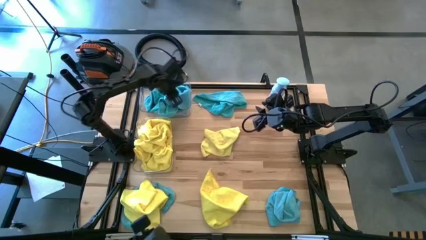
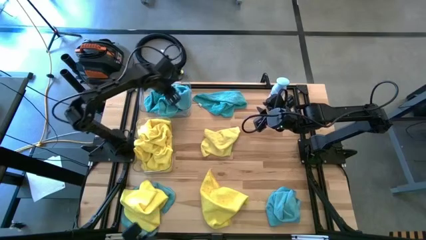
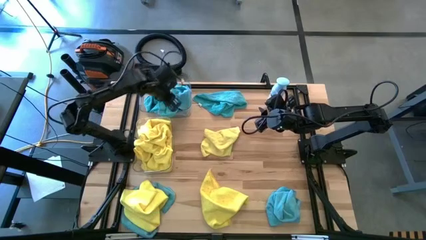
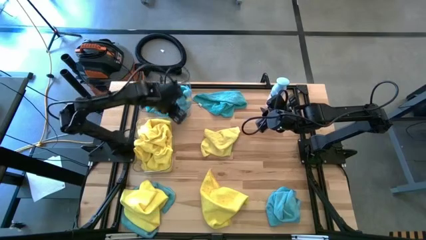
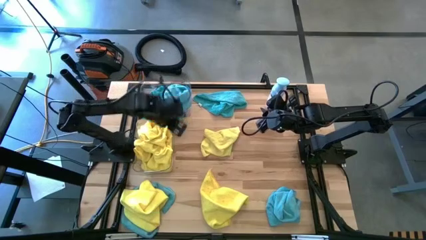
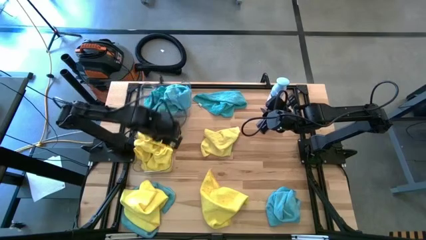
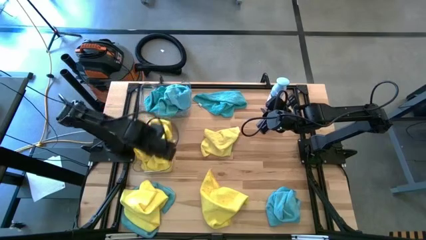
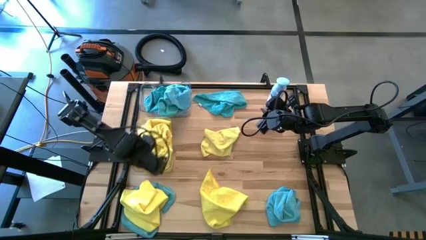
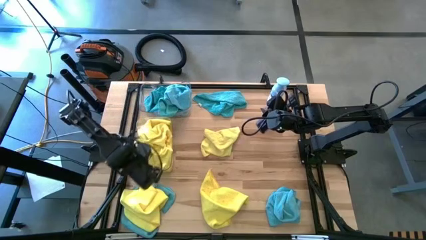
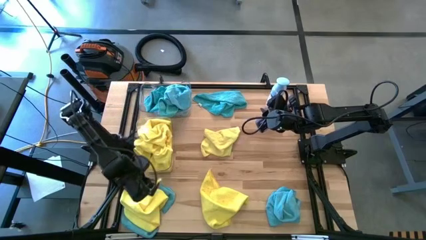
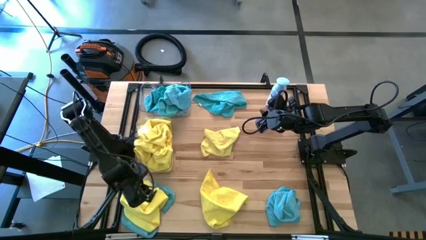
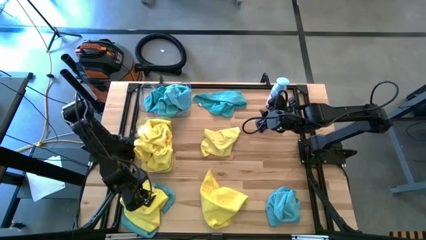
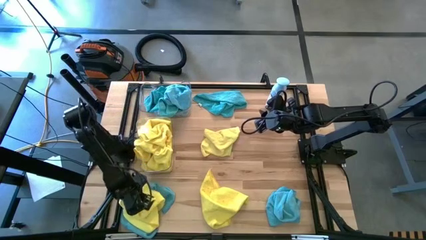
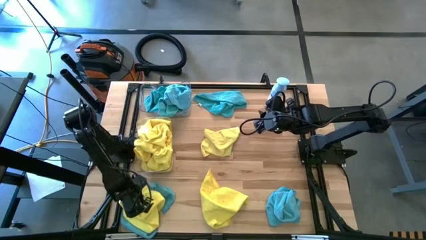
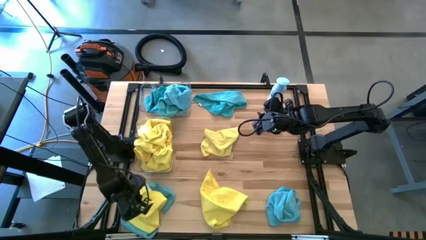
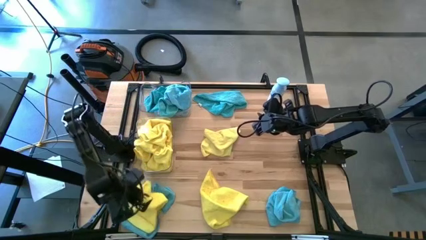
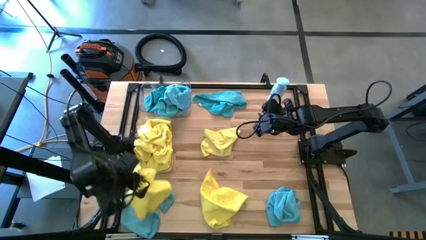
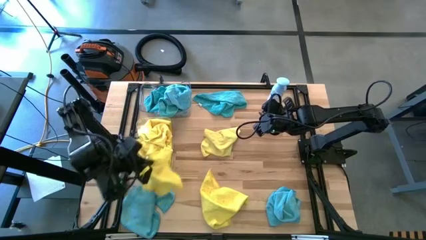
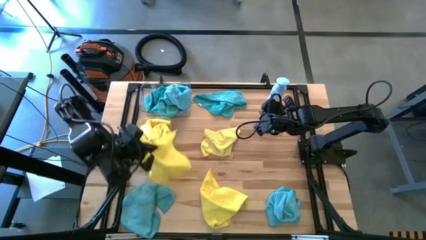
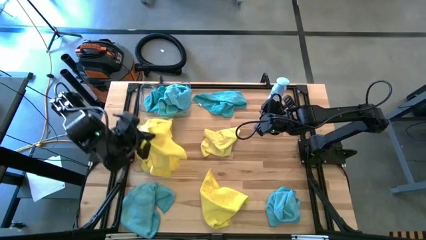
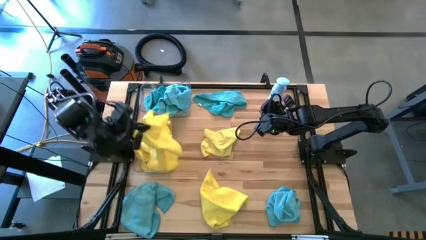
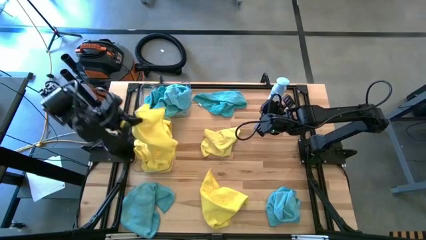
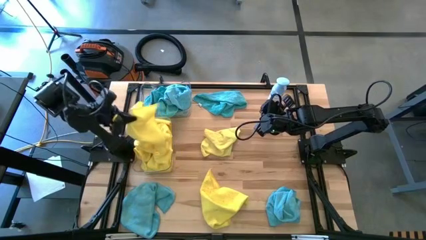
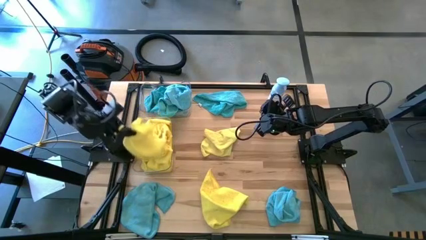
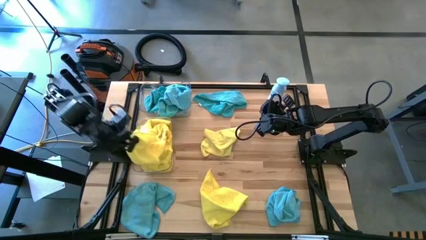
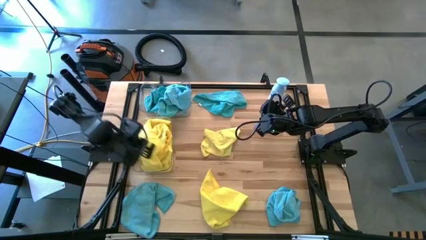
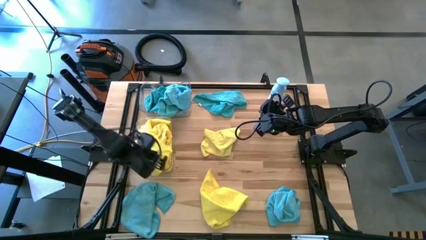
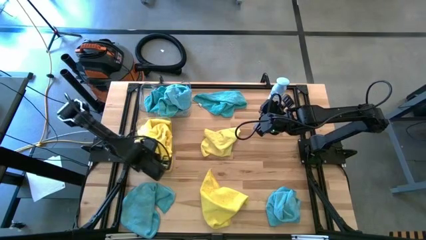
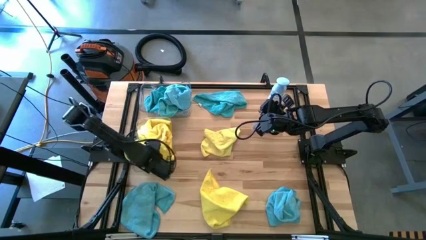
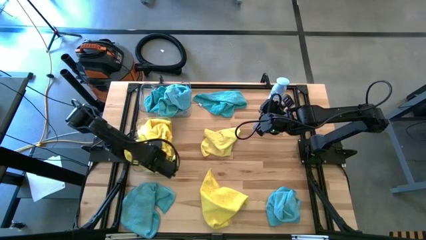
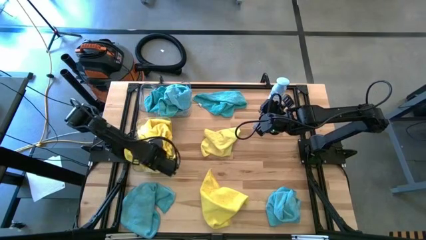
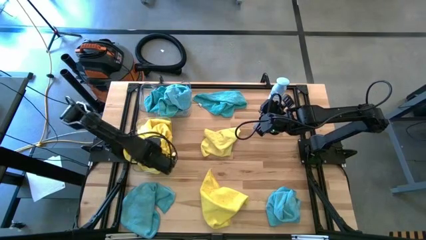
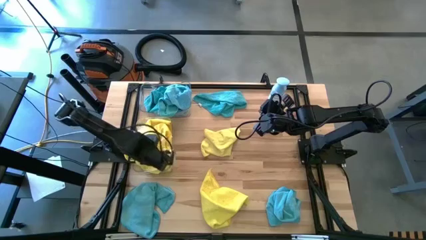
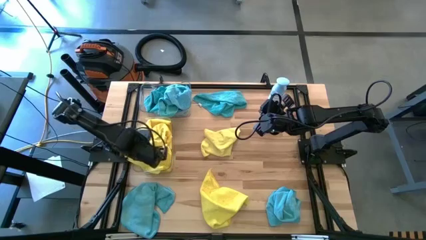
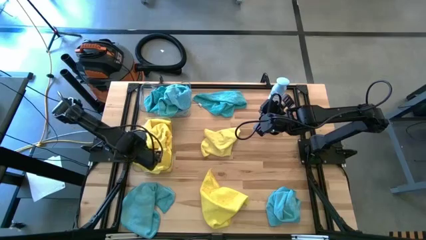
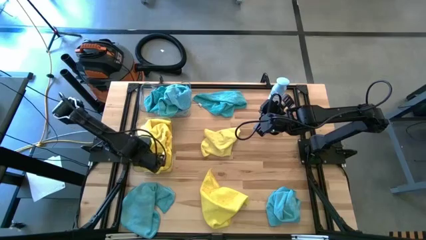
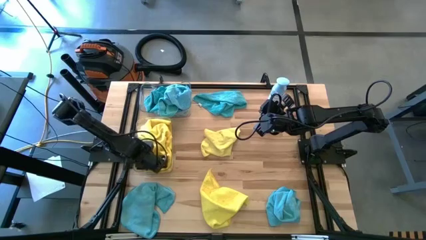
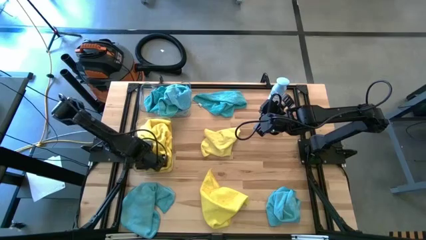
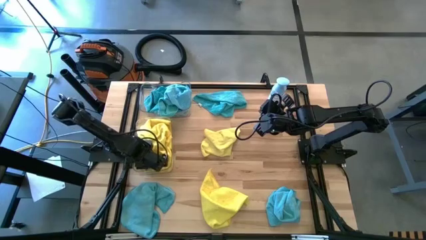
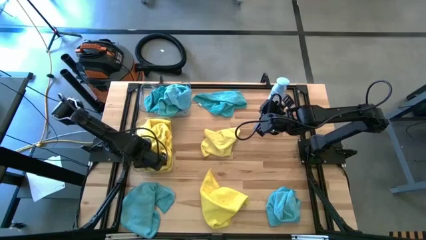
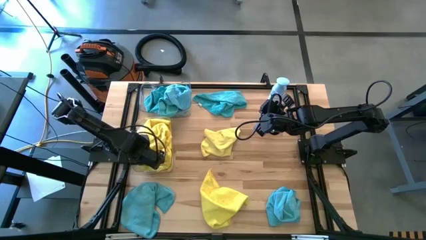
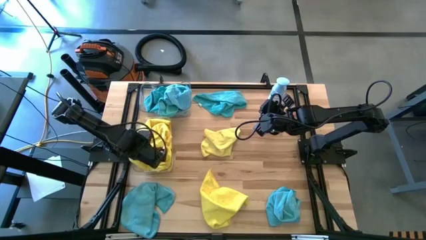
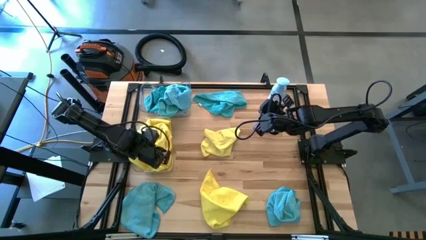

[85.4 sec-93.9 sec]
Task: Sort microfiber towel by color & place in baskets
Put the yellow towel into the bottom transparent bin

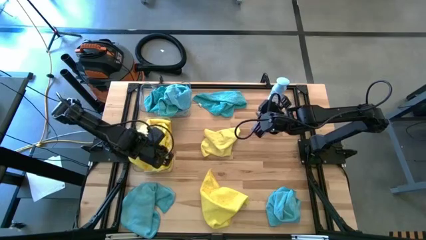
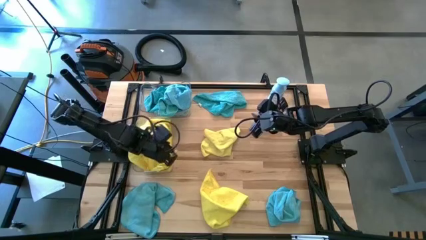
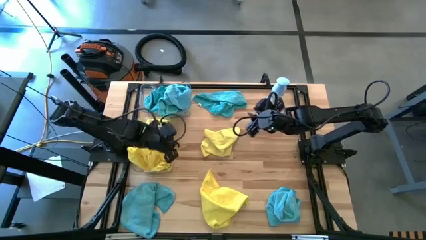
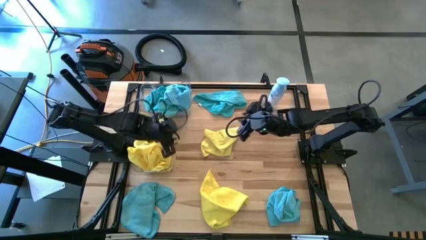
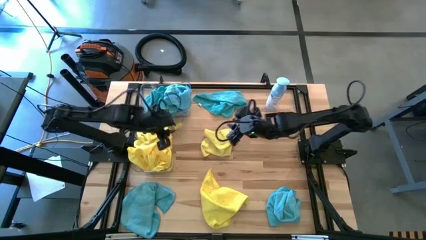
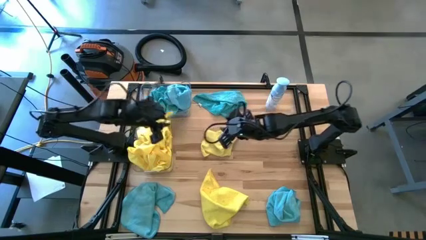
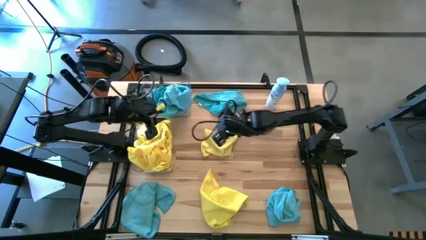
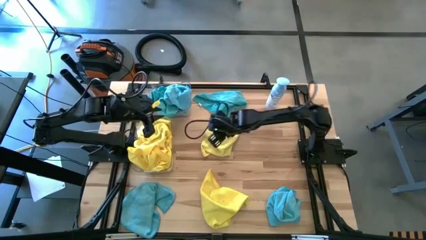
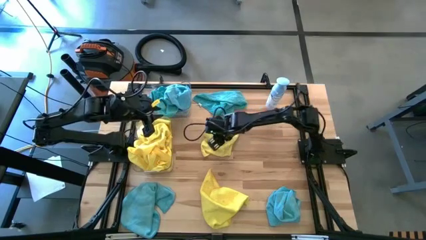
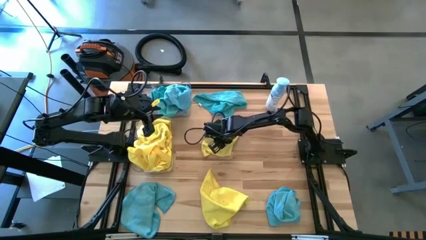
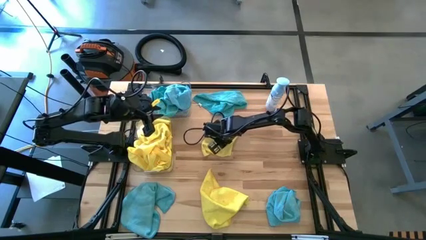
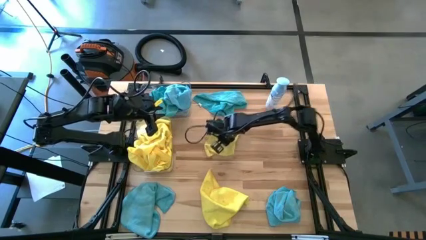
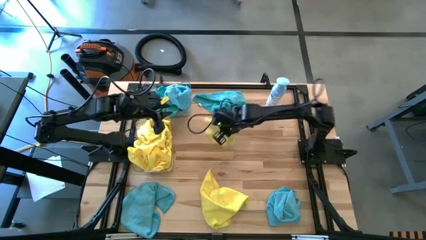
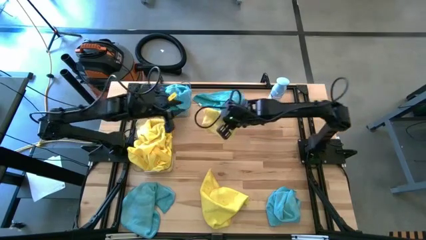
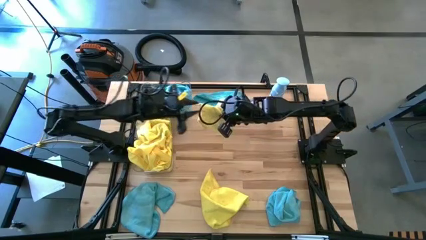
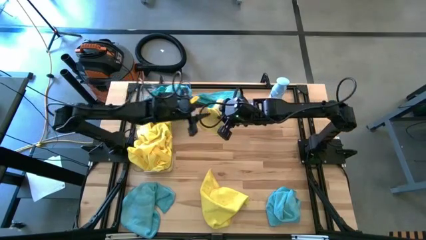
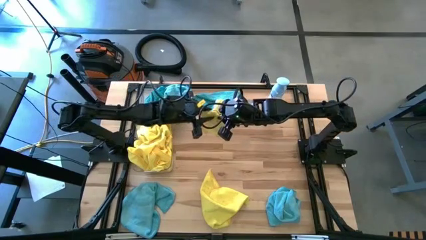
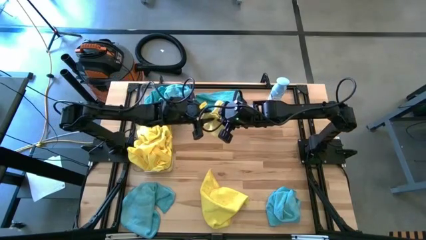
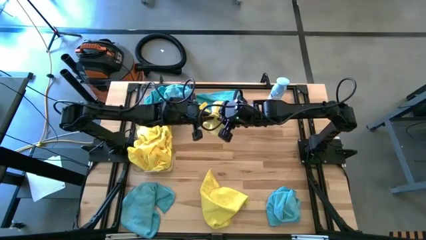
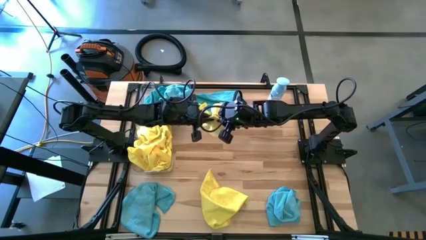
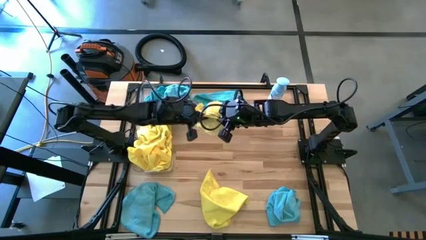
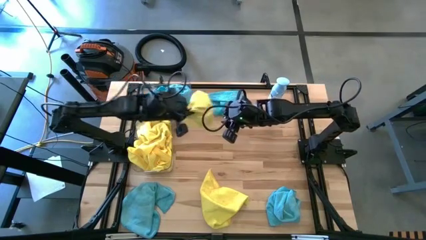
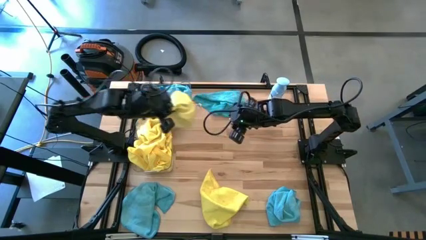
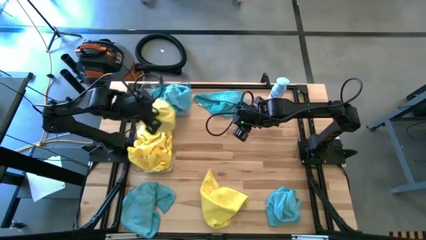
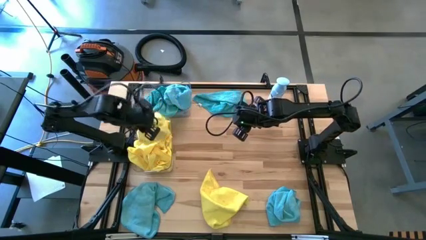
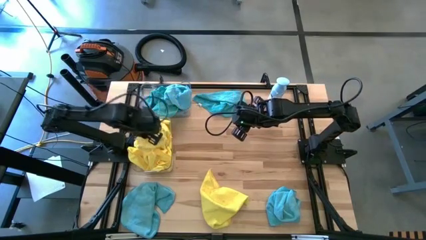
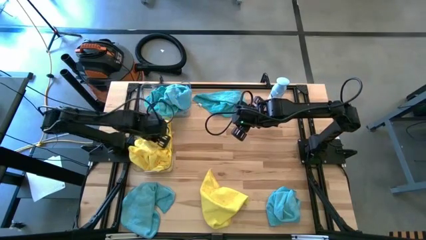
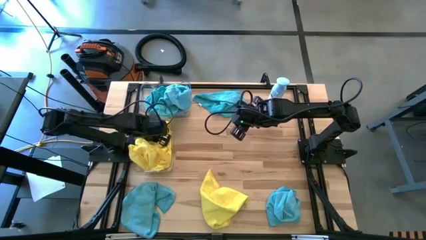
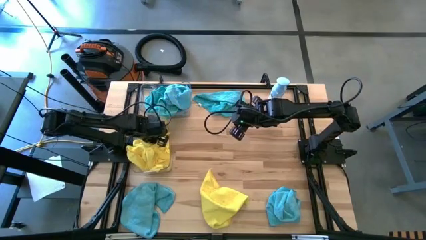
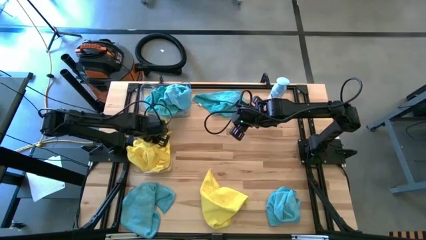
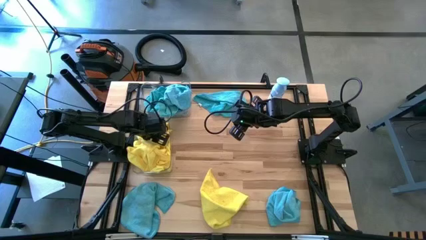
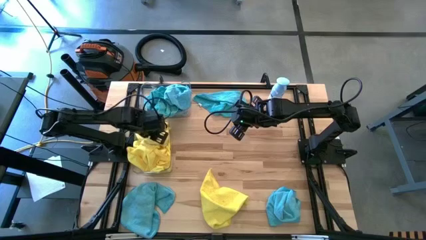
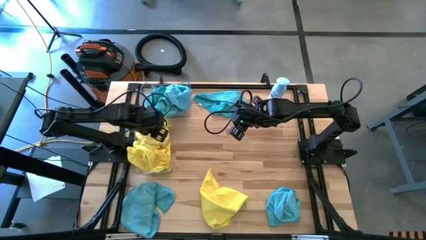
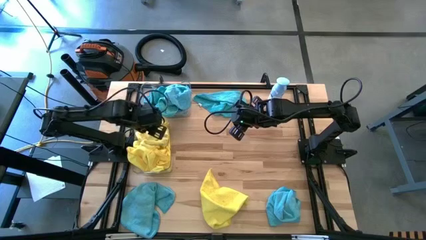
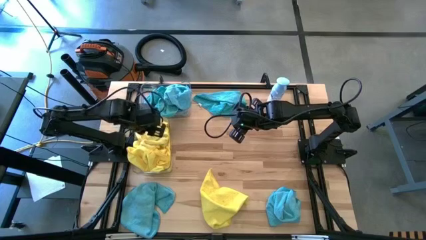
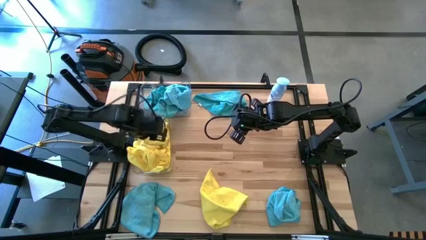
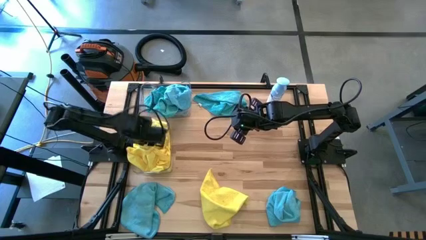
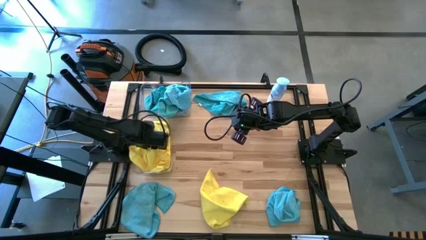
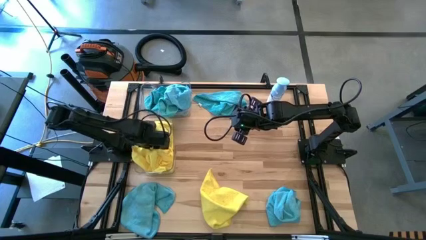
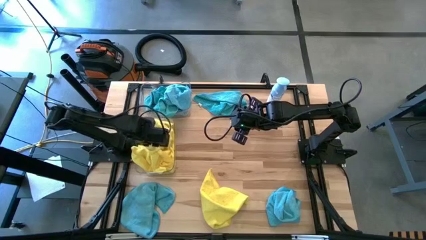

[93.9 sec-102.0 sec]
Put the yellow towel into the bottom transparent bin
